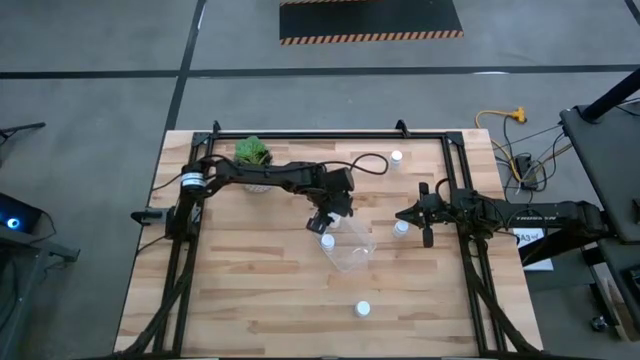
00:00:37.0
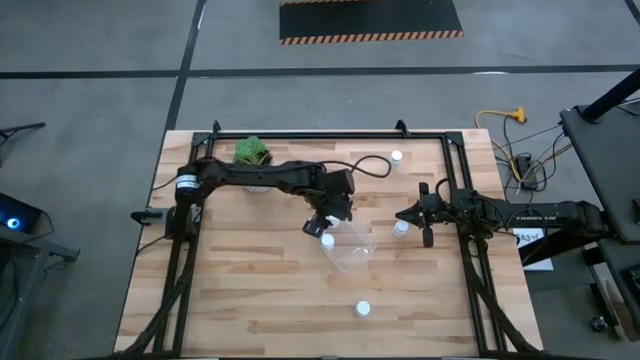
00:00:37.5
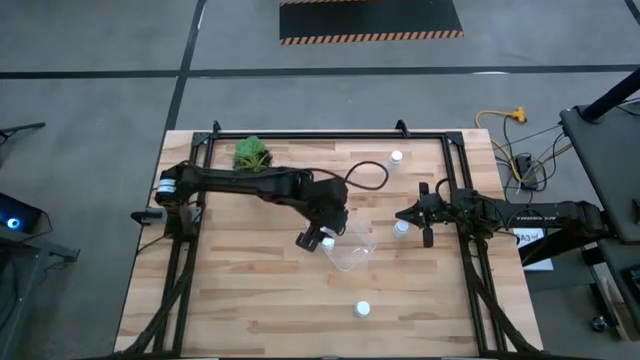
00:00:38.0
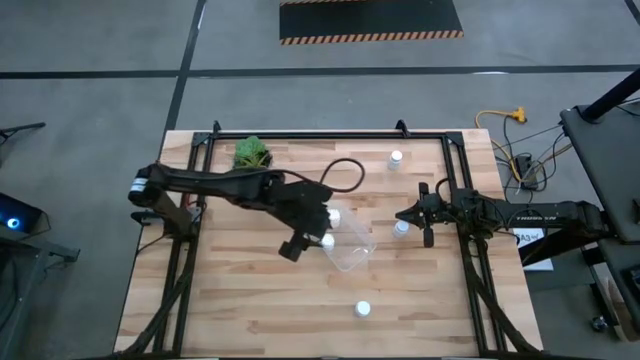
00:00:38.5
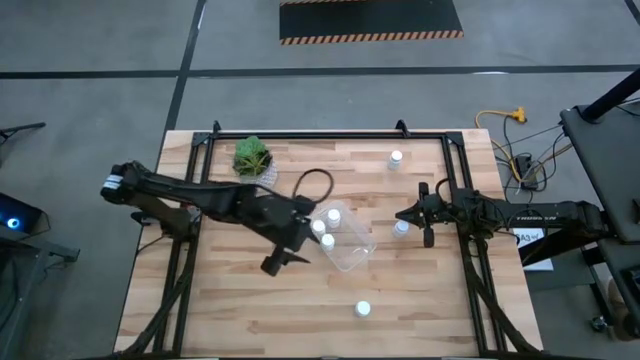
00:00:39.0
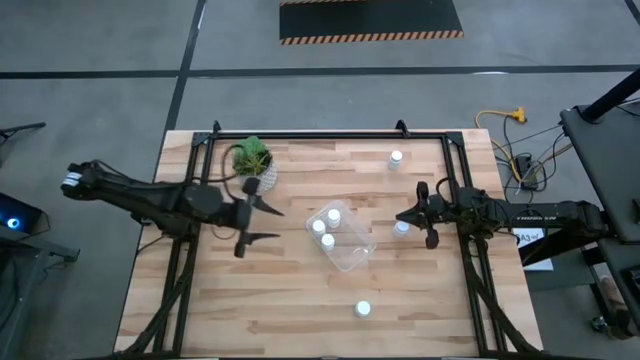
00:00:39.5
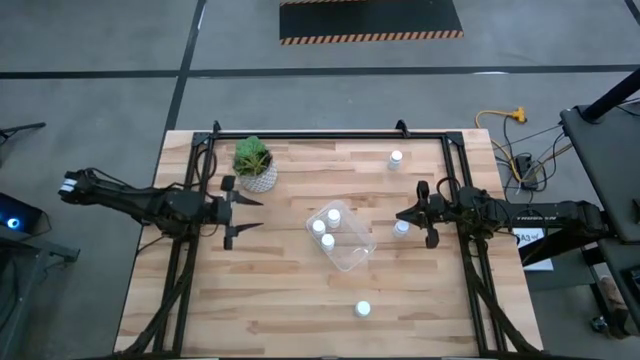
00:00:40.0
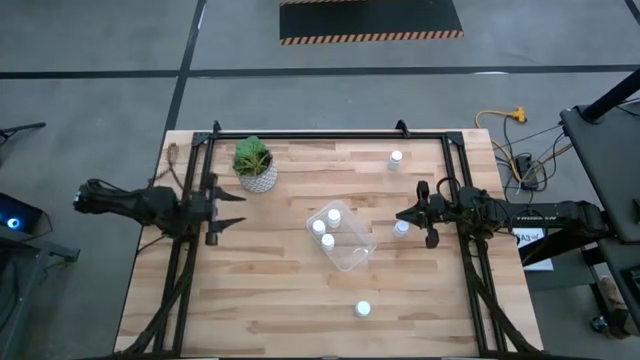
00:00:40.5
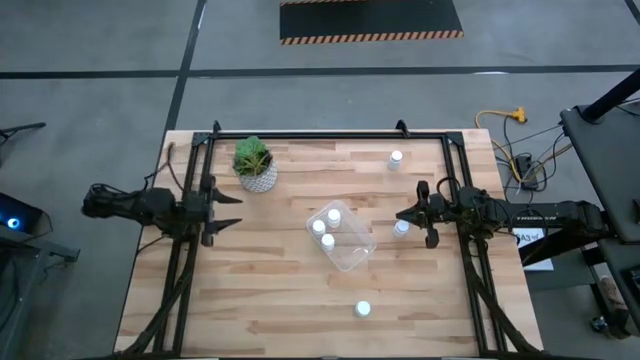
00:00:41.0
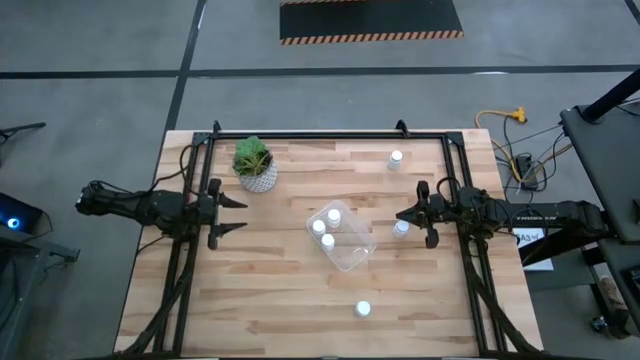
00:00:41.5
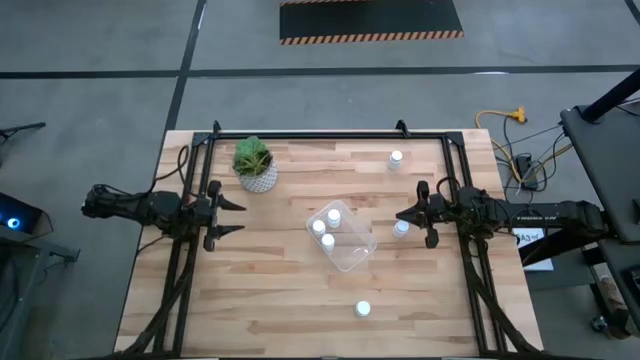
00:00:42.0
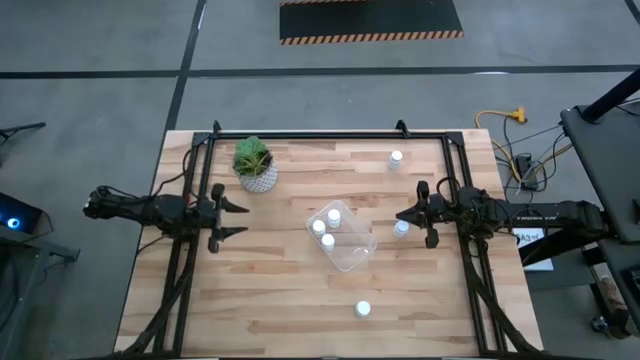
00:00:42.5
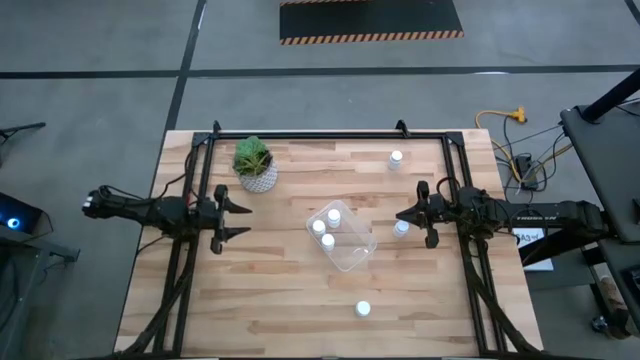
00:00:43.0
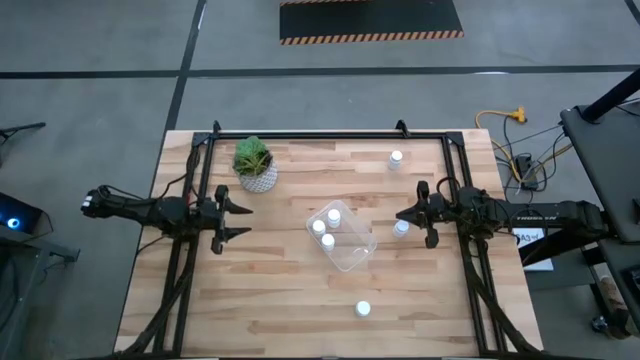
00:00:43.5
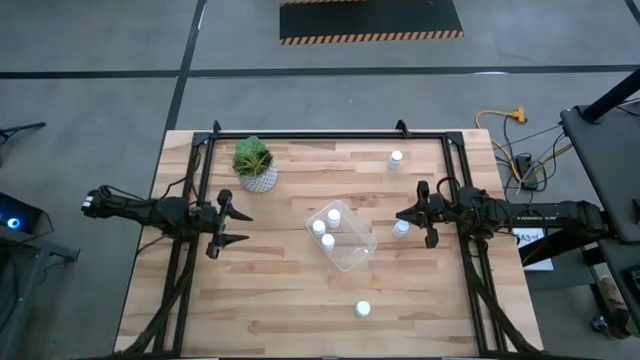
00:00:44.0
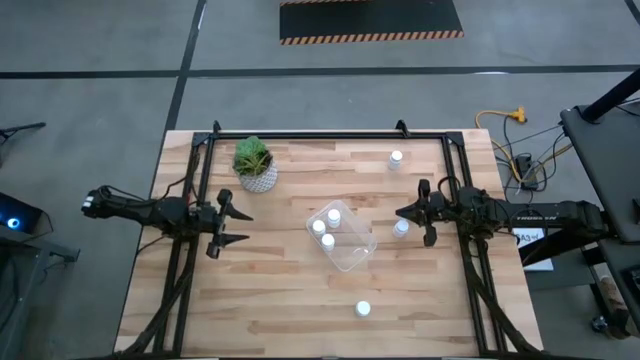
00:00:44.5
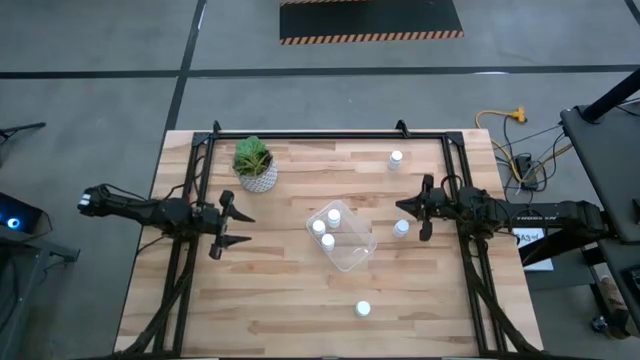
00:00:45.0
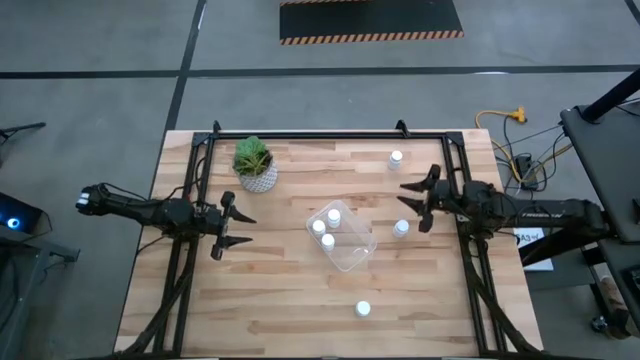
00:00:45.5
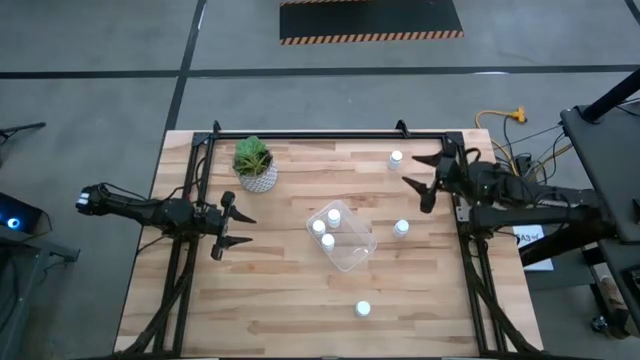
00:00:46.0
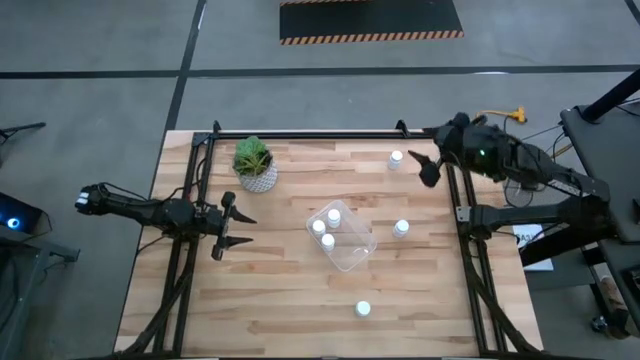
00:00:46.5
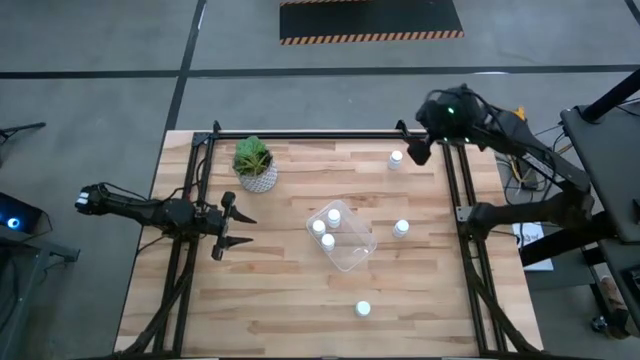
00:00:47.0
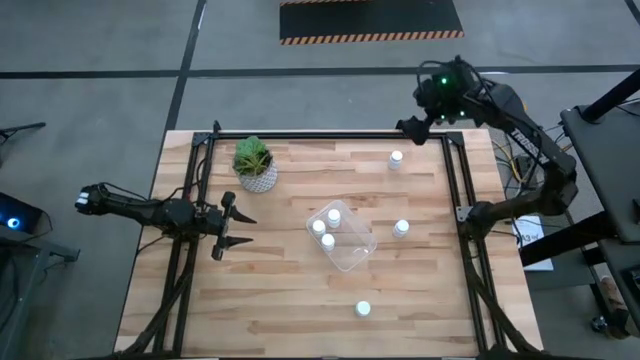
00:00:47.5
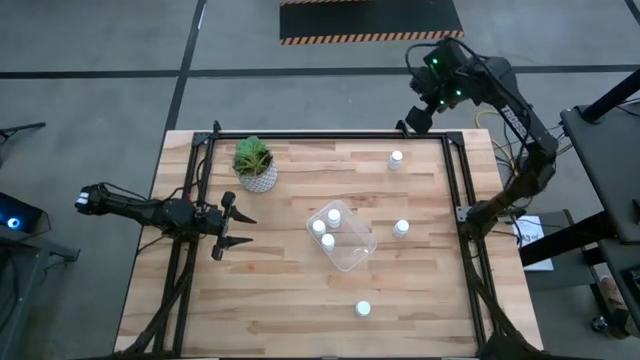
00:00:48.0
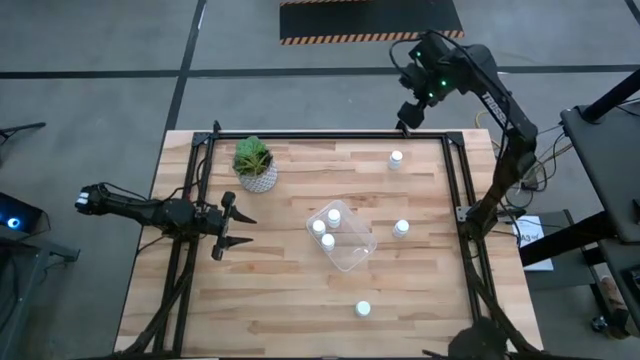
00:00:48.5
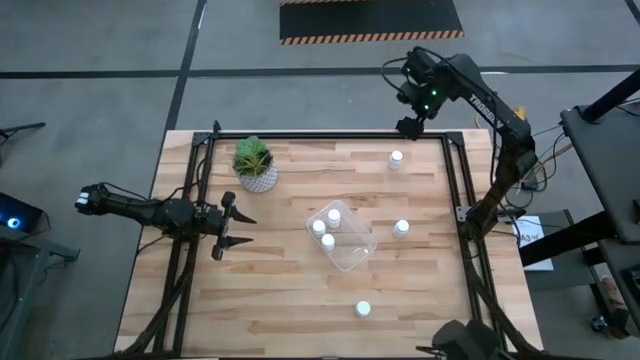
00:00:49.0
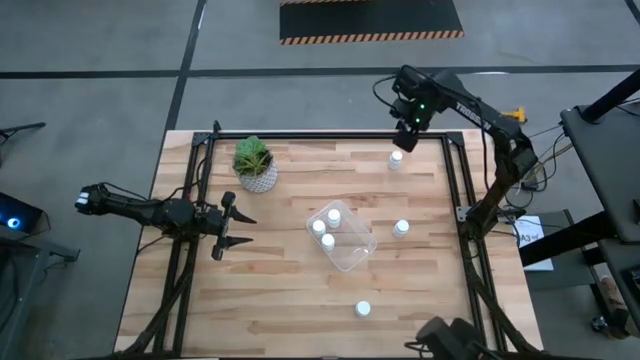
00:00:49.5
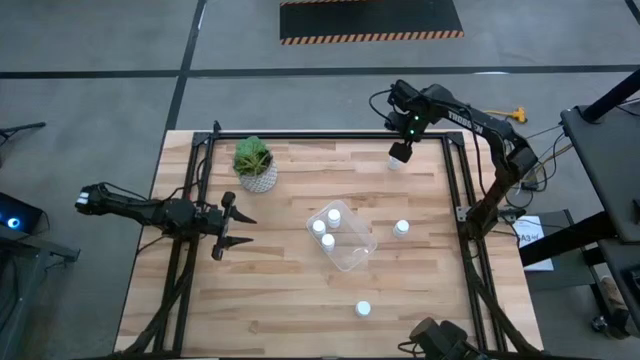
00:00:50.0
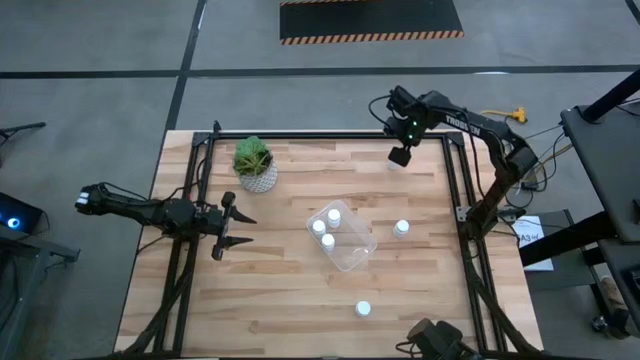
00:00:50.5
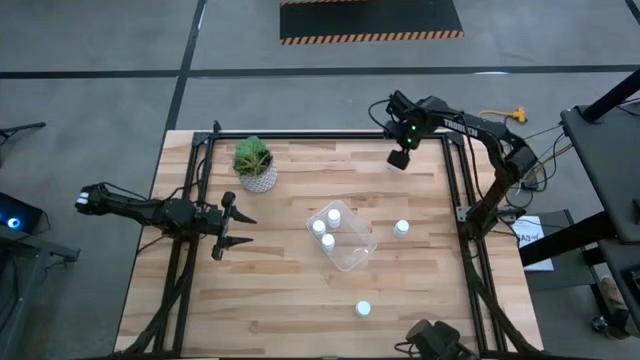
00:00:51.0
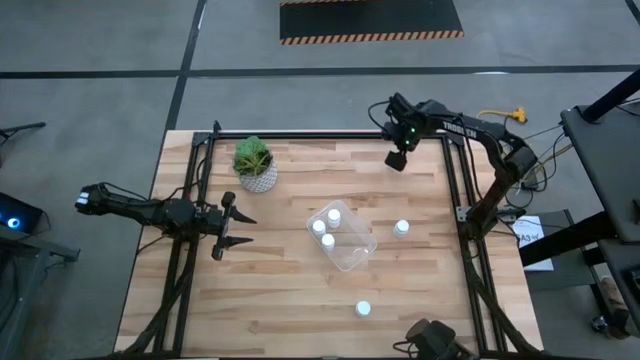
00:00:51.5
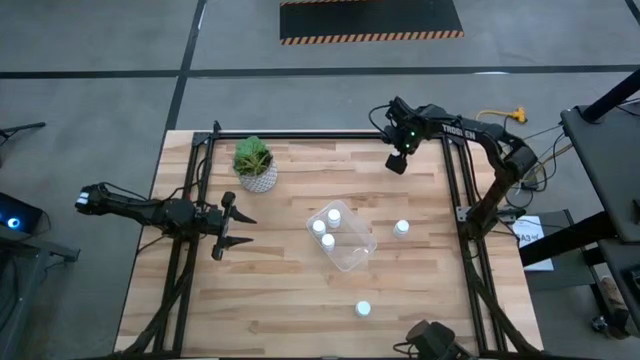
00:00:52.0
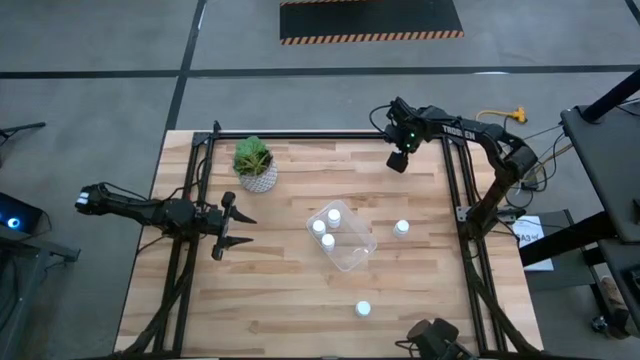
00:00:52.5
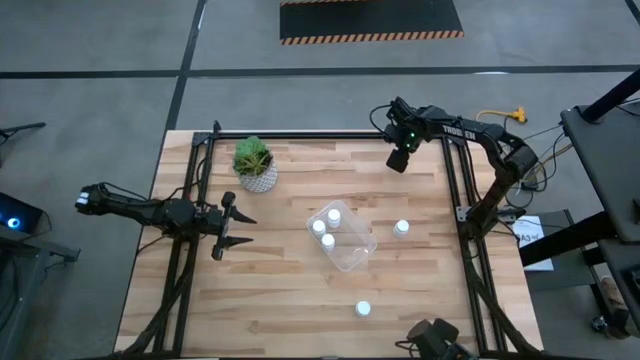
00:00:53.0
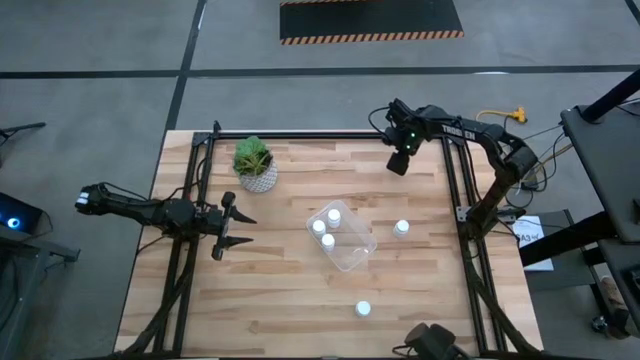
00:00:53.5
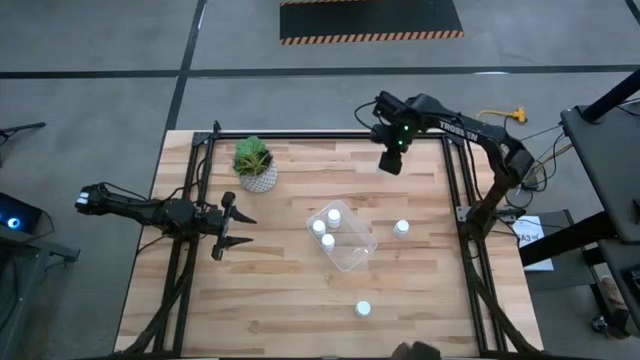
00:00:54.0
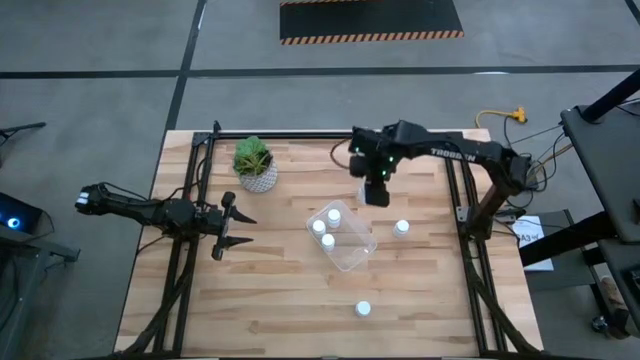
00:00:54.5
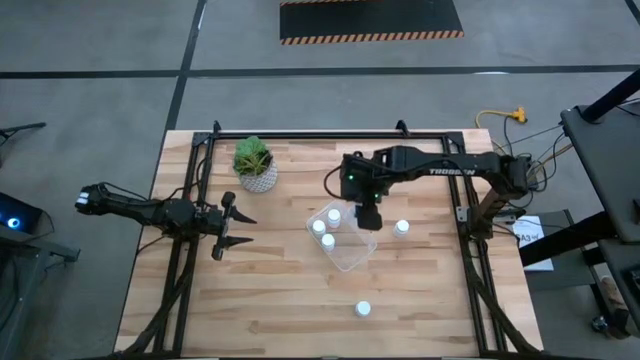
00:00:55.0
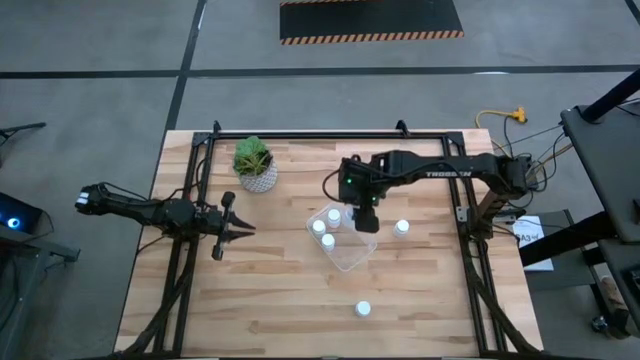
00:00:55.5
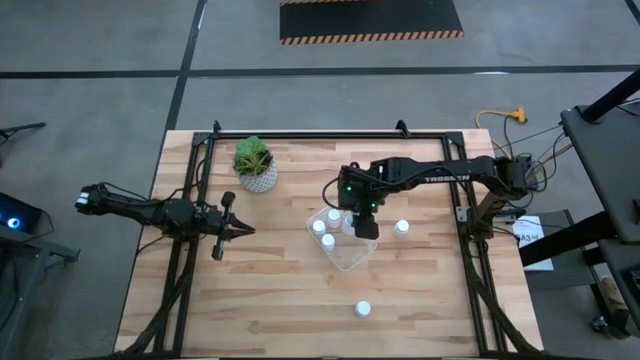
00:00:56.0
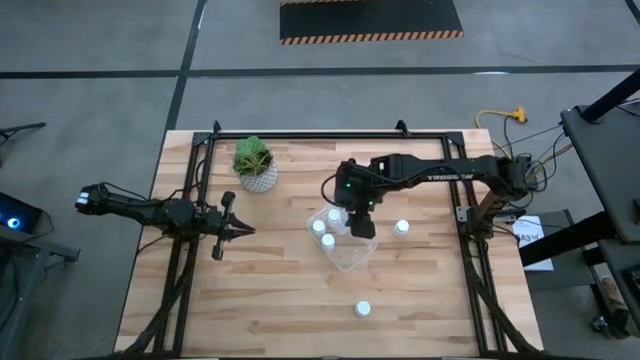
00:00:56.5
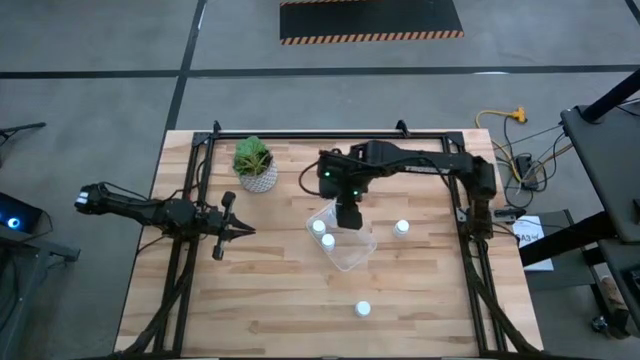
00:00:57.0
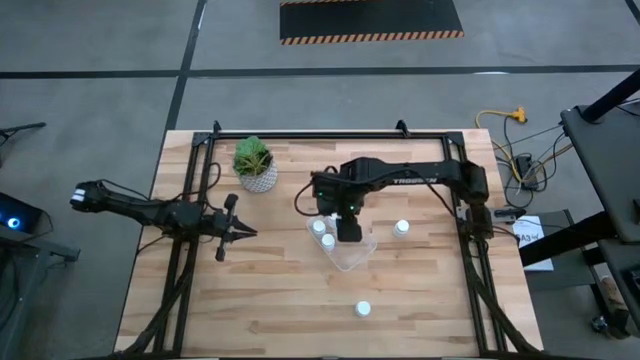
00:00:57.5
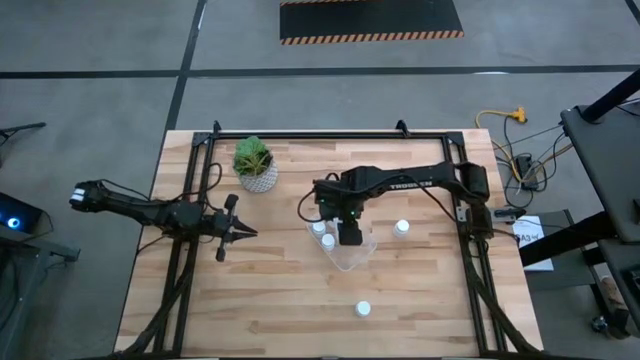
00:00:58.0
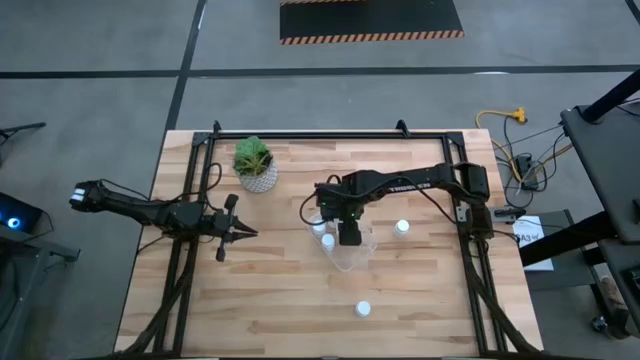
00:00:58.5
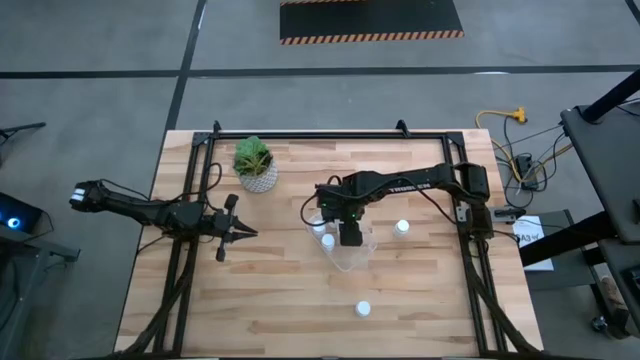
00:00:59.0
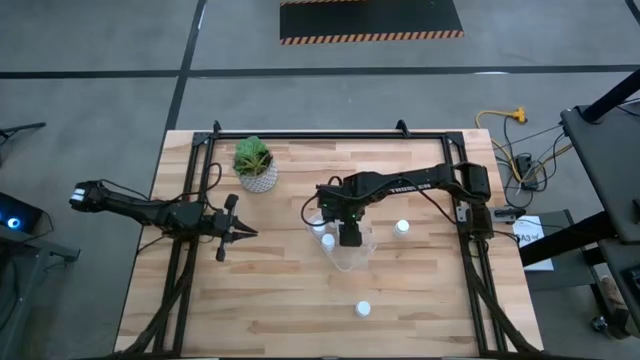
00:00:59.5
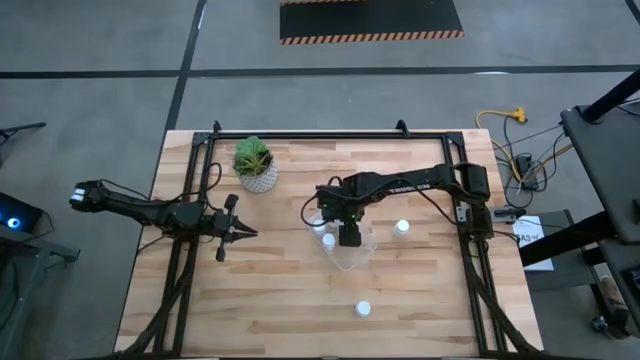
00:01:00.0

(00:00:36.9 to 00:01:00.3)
Task: Pick and place pill bottles into a basket
Put the white medicine bottle in the transparent bin
